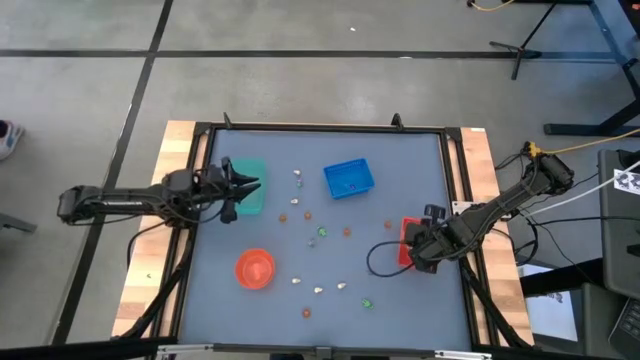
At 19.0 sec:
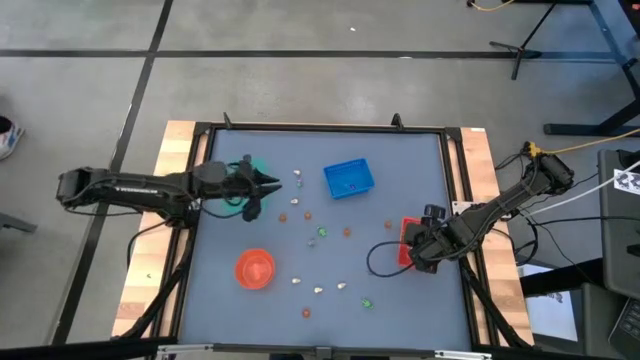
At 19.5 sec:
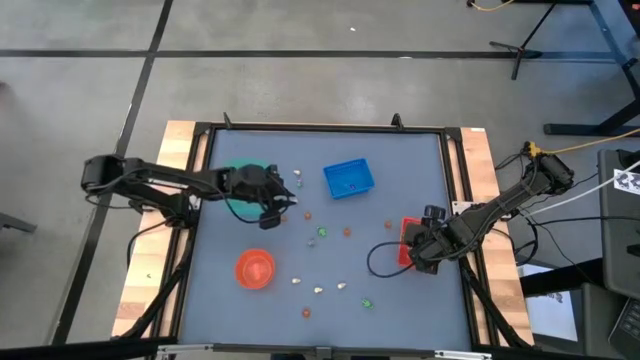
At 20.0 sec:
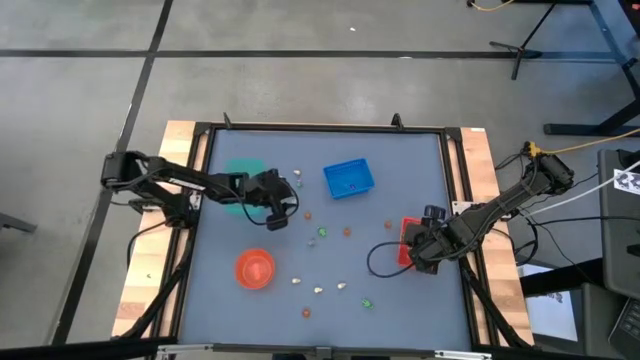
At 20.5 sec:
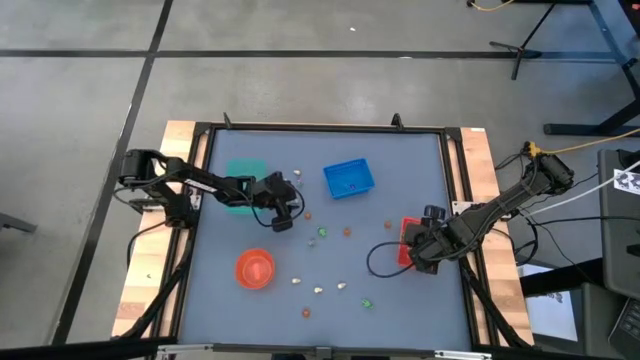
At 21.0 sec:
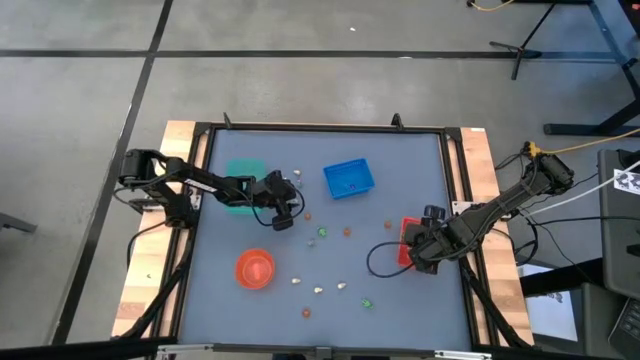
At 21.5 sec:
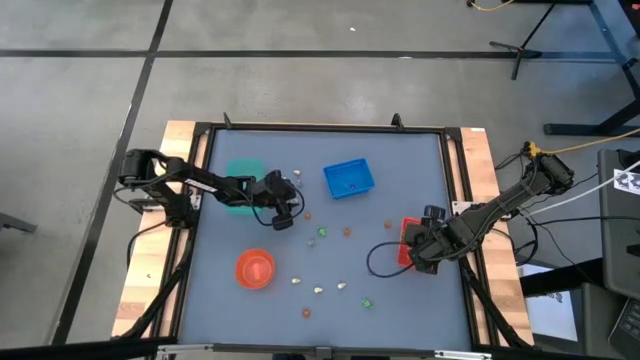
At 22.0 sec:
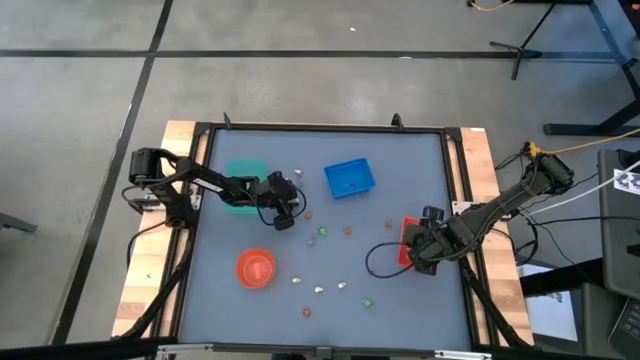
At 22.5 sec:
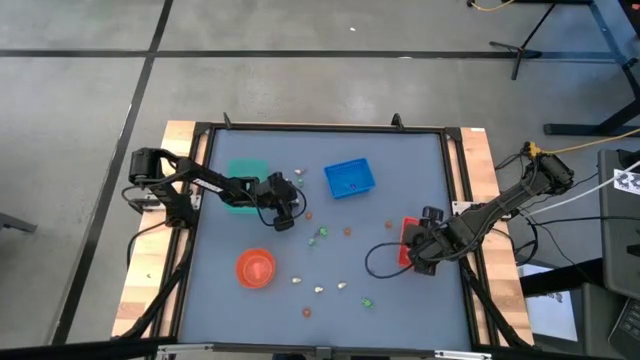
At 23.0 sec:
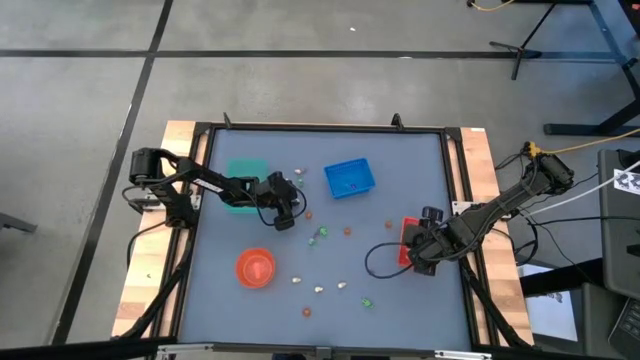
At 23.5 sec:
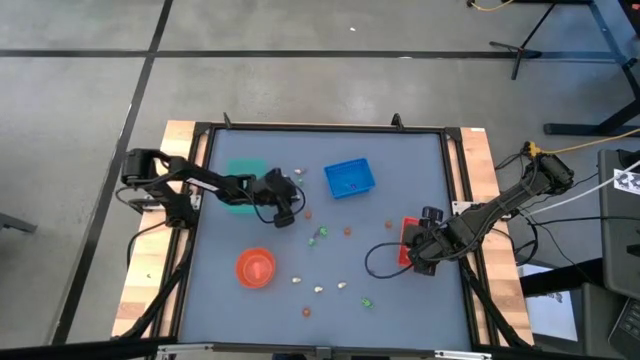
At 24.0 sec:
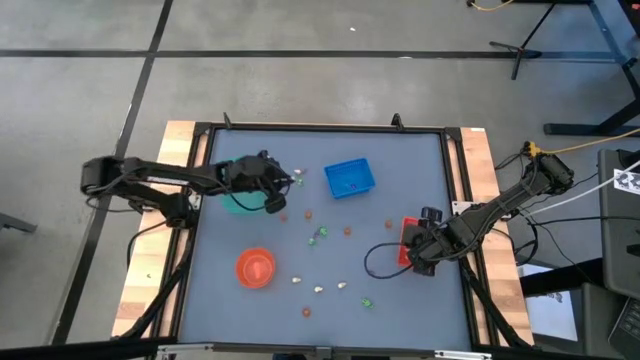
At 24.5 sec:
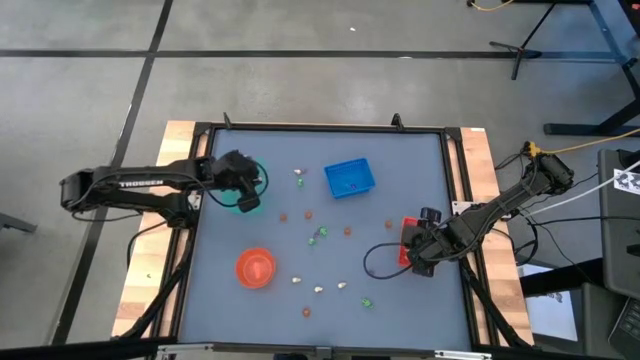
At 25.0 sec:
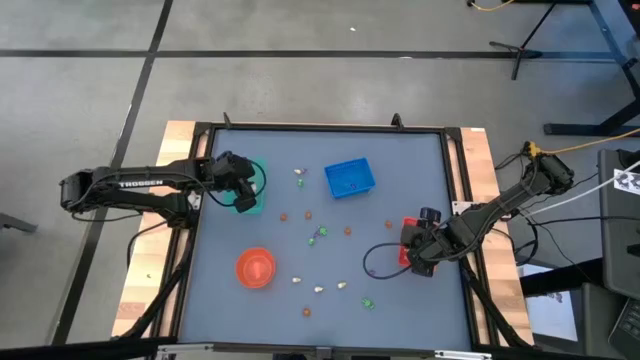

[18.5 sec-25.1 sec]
Task: Sort Halloween decoration
Put the white skull toy into the green bin

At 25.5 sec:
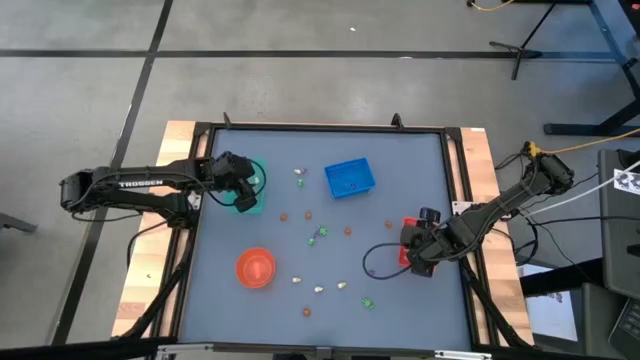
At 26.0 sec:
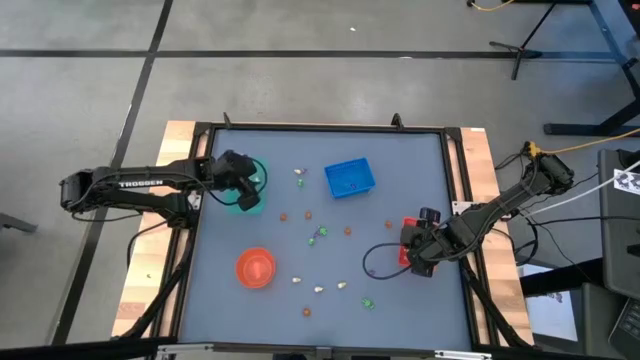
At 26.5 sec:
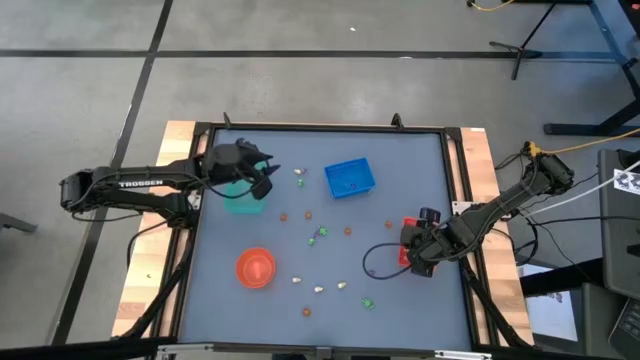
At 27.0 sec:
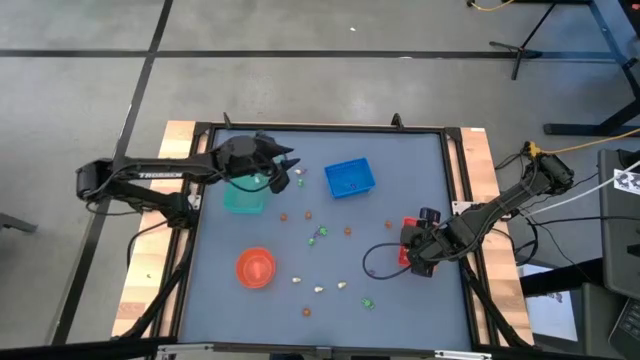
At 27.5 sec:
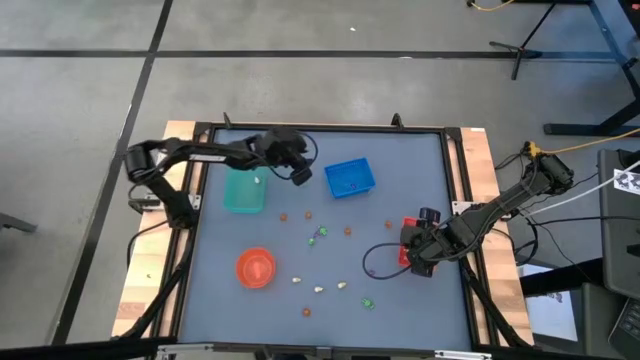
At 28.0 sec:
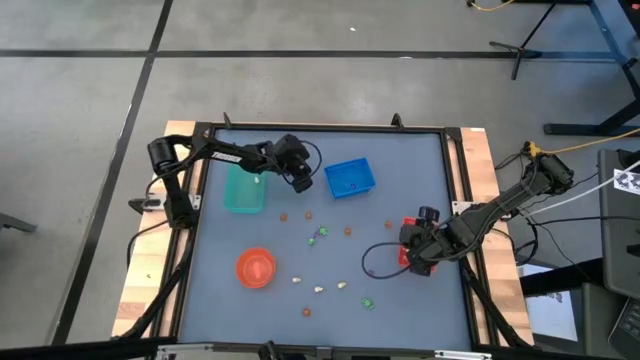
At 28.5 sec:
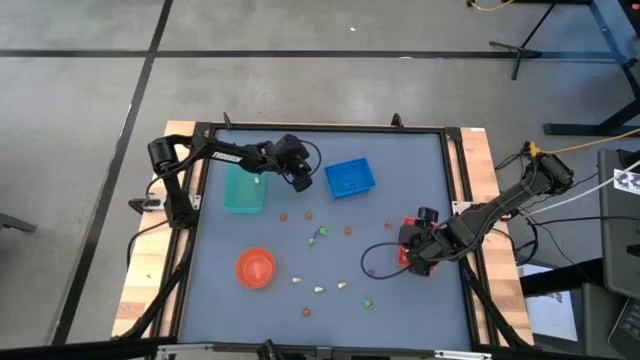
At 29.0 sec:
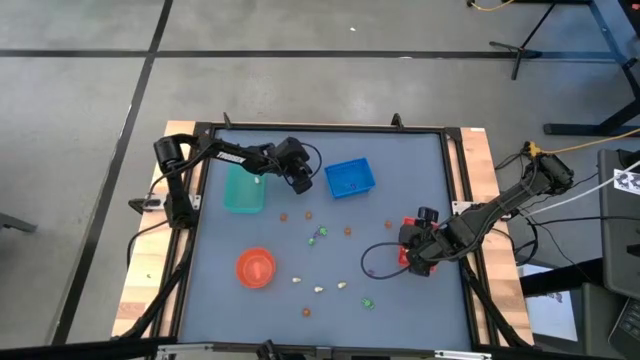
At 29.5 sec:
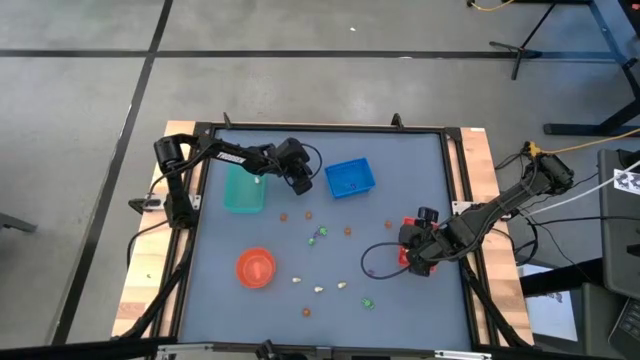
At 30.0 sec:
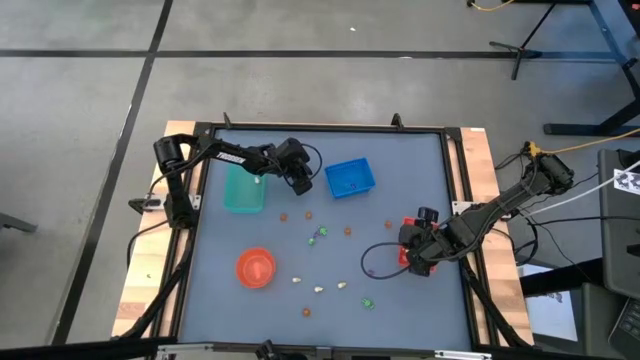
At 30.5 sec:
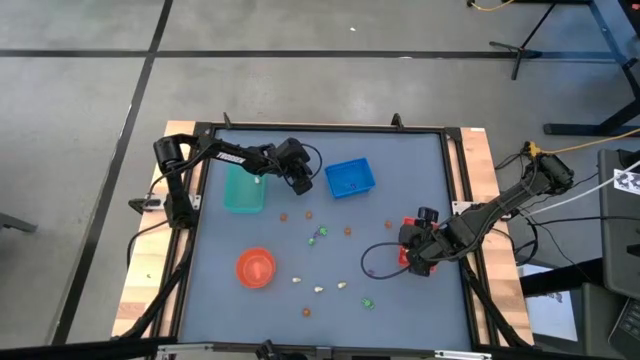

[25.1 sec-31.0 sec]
Put the purple hat toy into the blue bin

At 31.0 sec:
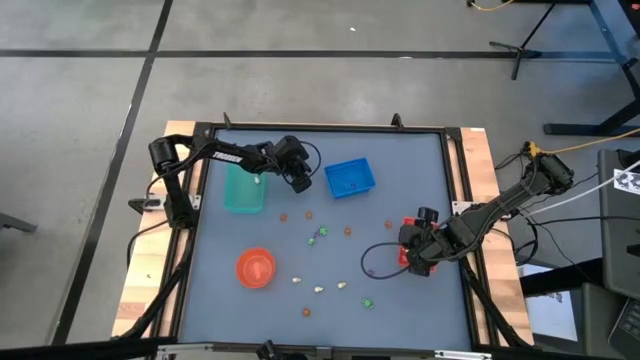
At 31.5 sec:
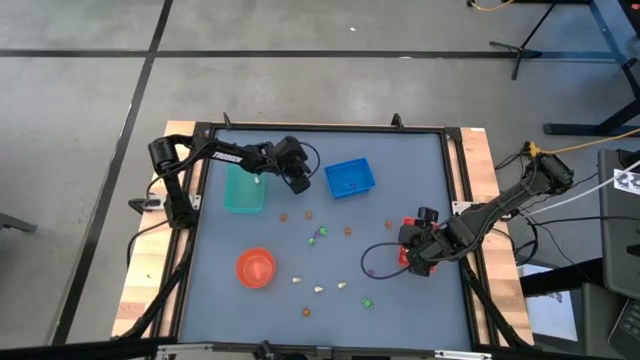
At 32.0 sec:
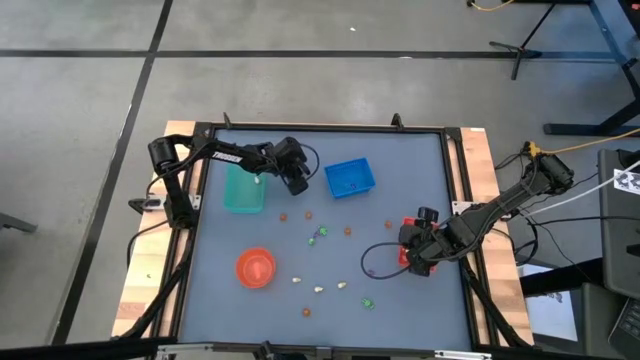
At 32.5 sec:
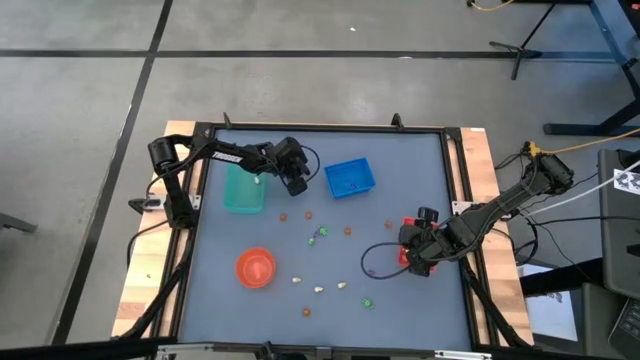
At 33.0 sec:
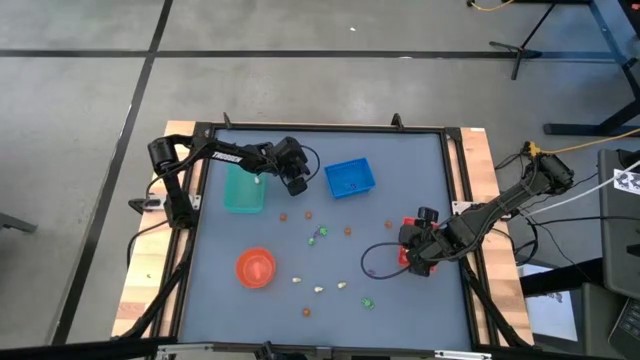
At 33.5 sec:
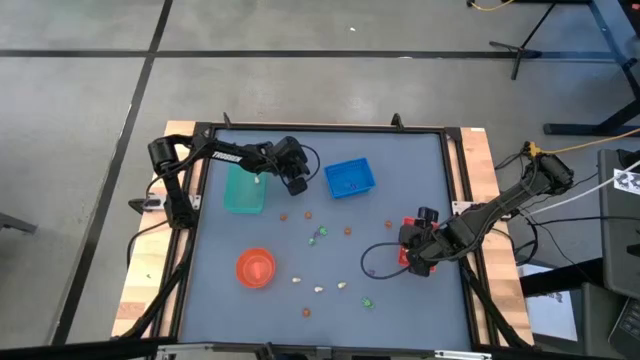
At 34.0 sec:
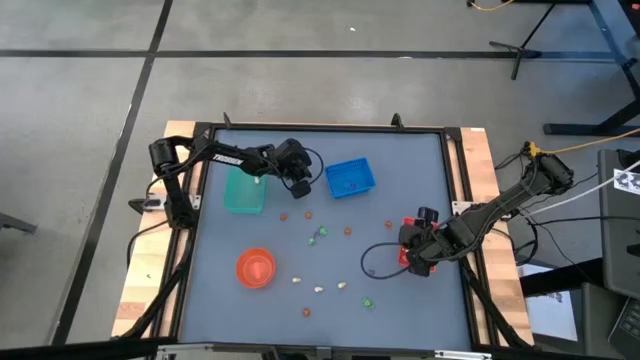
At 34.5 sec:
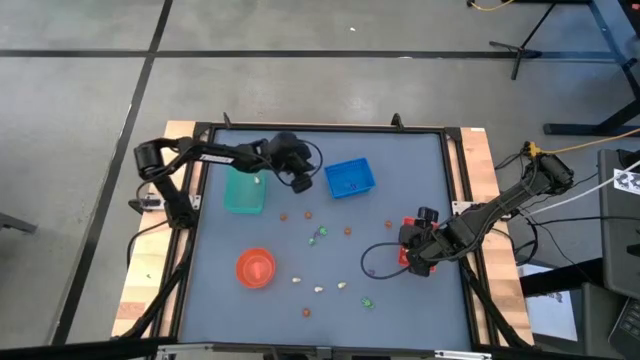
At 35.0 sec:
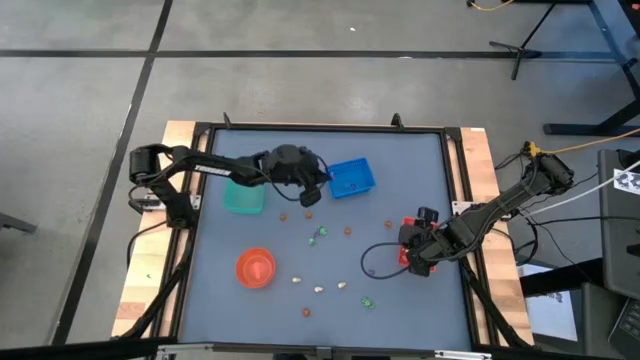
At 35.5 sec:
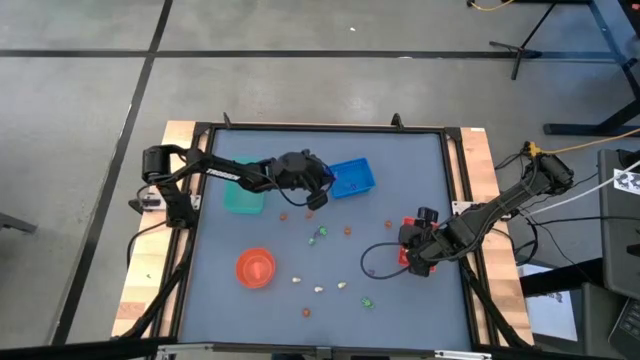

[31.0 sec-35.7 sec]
Put the purple hat toy into the blue bin

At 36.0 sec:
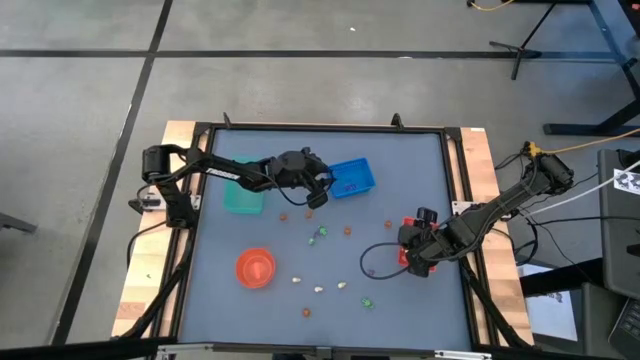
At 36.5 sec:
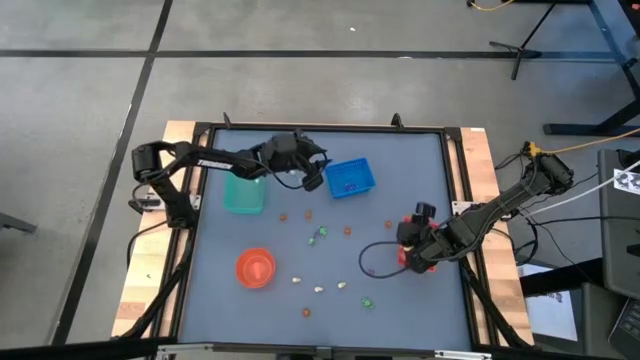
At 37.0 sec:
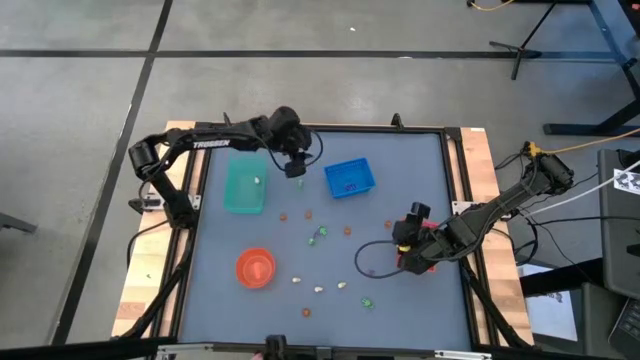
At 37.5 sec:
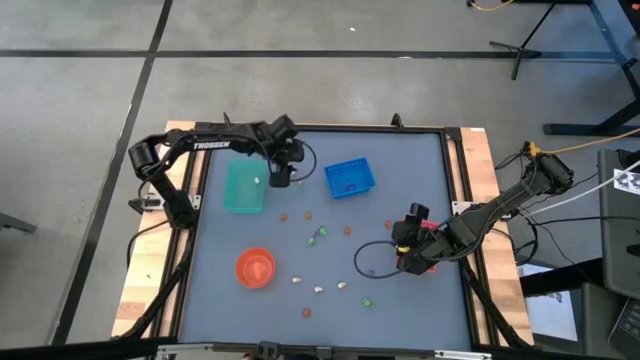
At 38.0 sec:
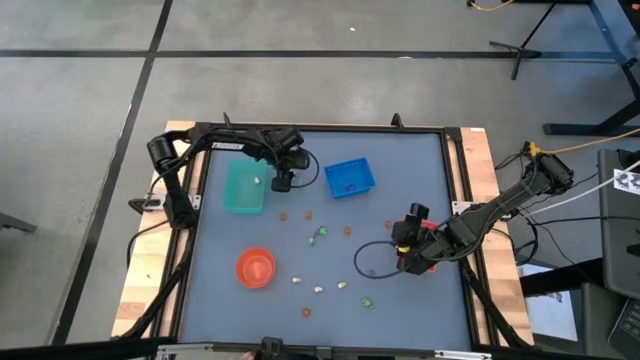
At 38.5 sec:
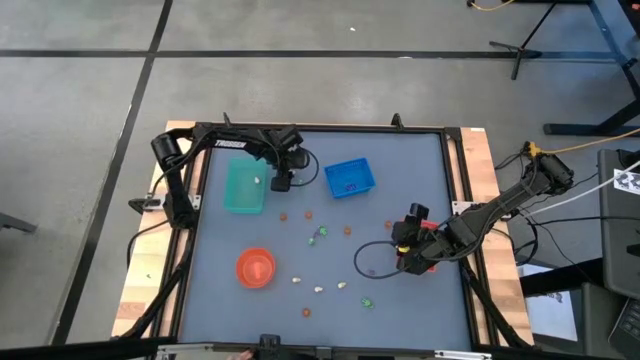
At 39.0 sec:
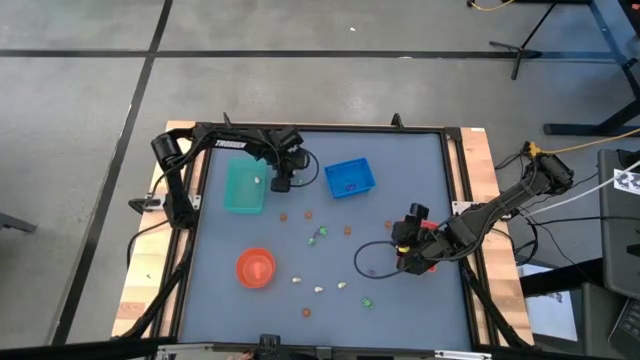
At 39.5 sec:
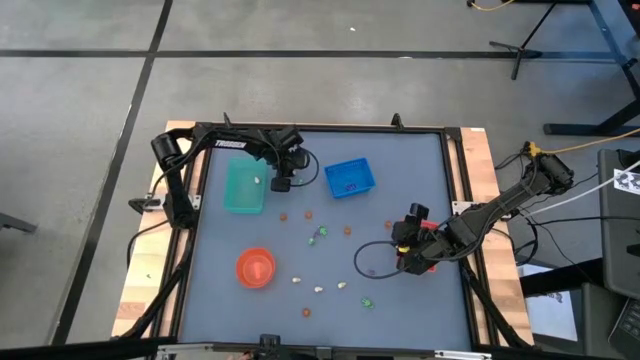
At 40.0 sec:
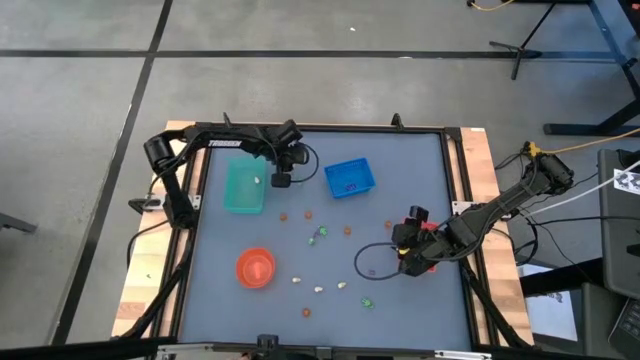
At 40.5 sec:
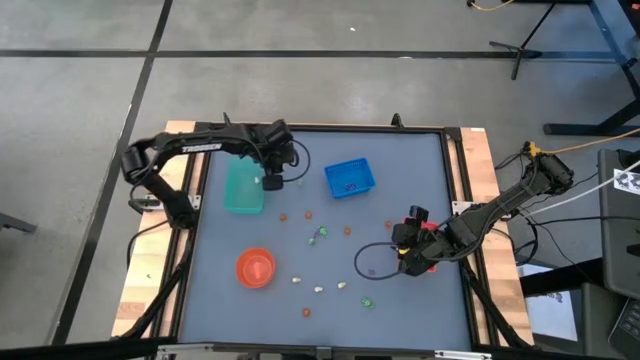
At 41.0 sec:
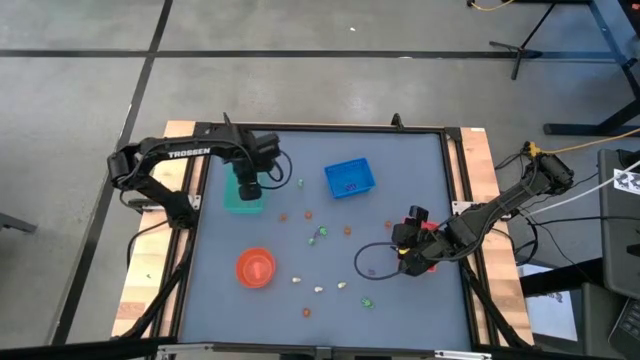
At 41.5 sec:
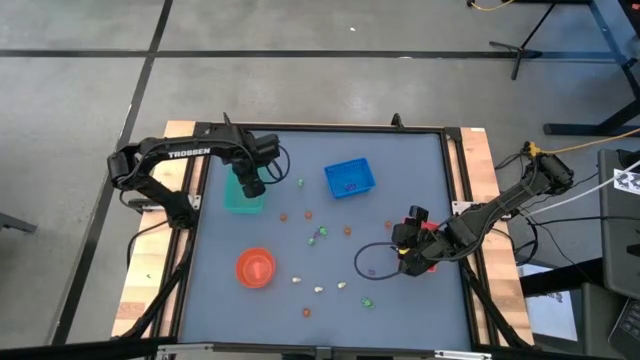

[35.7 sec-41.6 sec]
Put the white skull toy into the green bin
